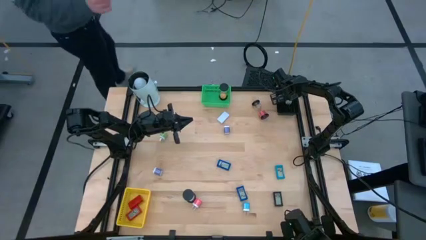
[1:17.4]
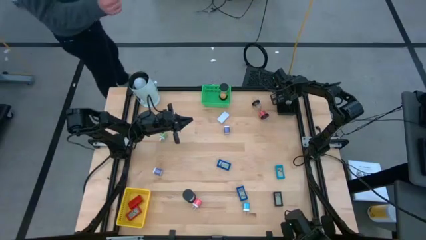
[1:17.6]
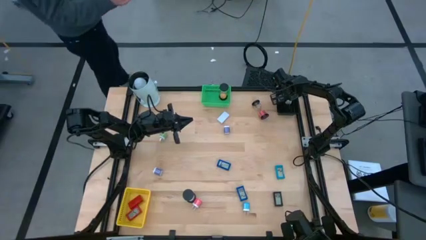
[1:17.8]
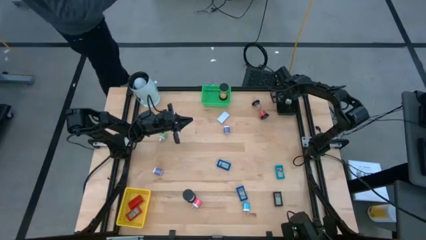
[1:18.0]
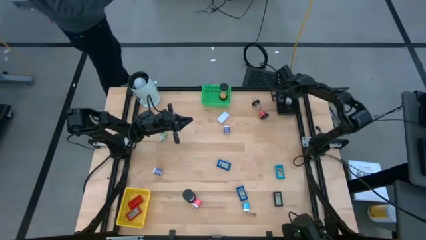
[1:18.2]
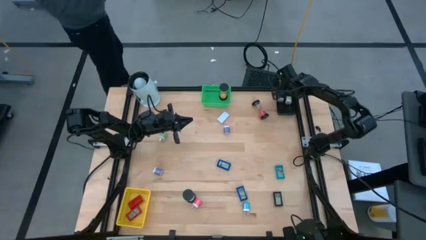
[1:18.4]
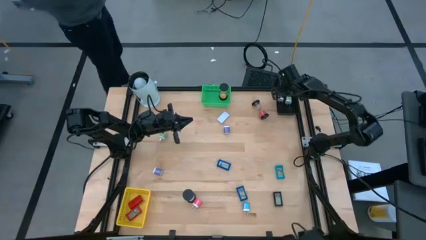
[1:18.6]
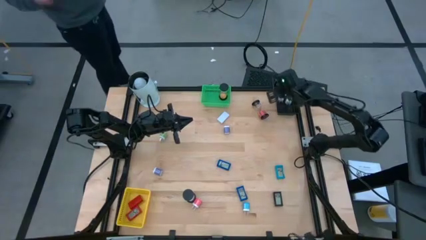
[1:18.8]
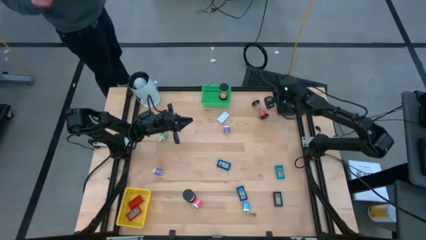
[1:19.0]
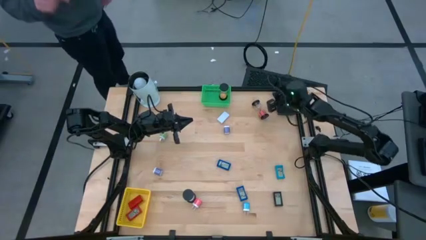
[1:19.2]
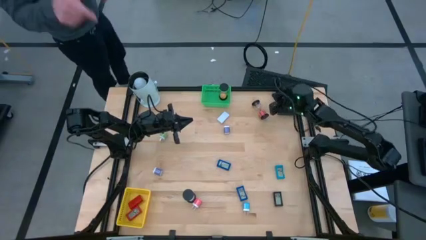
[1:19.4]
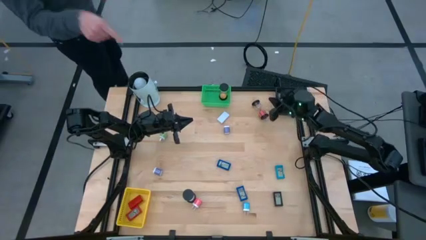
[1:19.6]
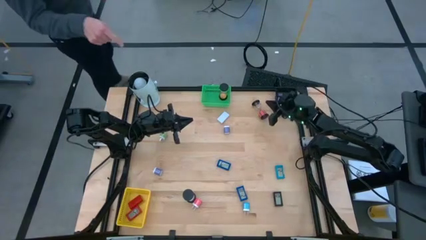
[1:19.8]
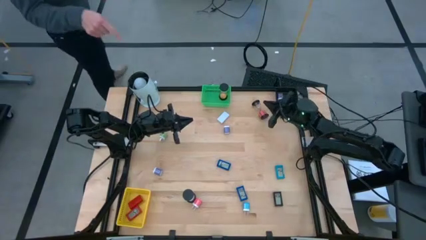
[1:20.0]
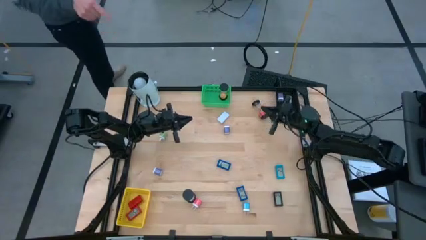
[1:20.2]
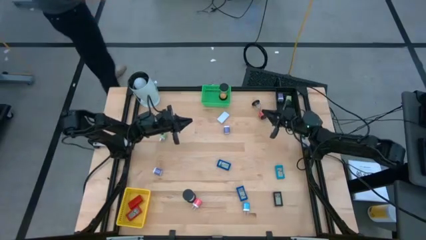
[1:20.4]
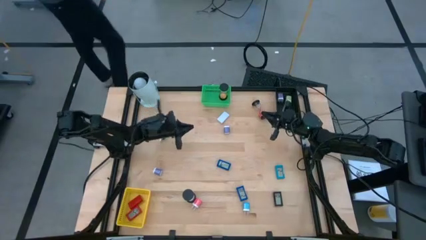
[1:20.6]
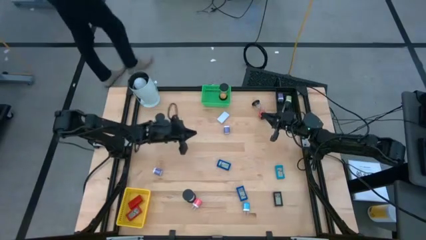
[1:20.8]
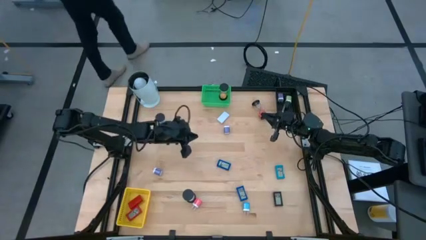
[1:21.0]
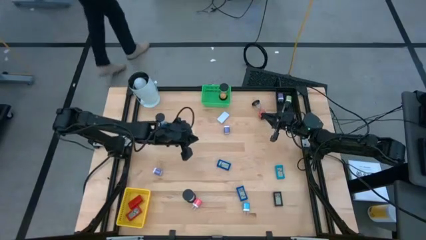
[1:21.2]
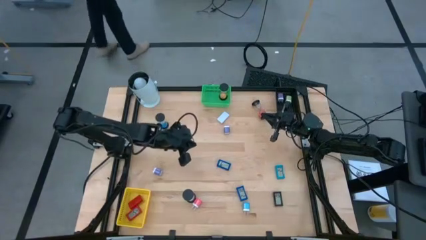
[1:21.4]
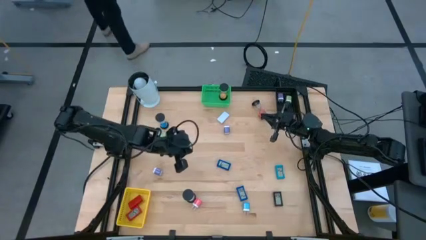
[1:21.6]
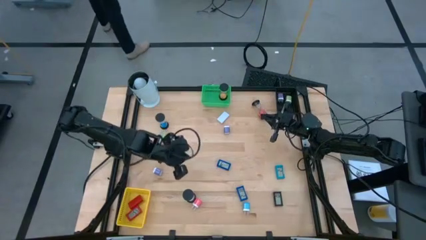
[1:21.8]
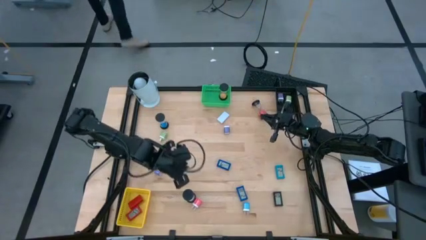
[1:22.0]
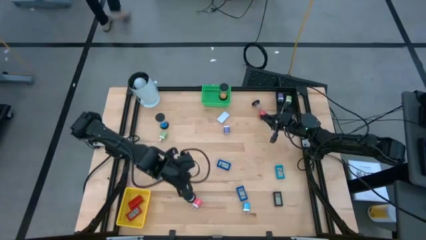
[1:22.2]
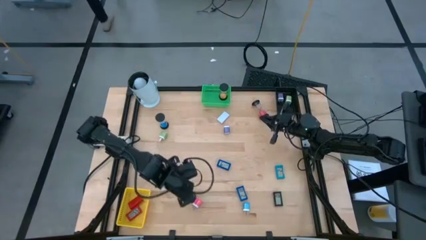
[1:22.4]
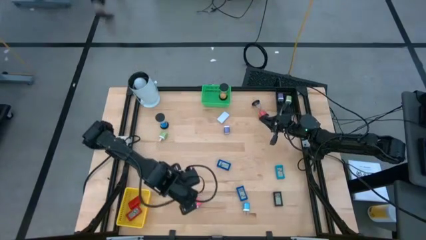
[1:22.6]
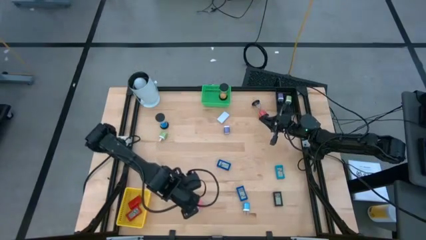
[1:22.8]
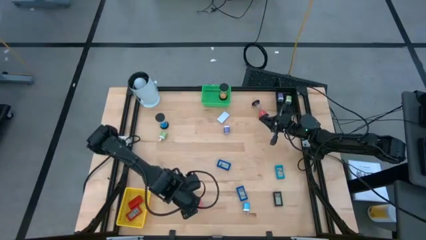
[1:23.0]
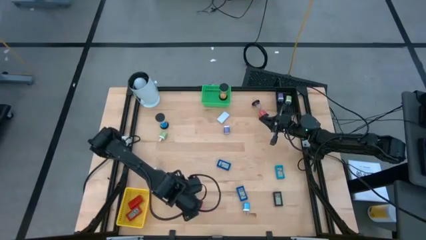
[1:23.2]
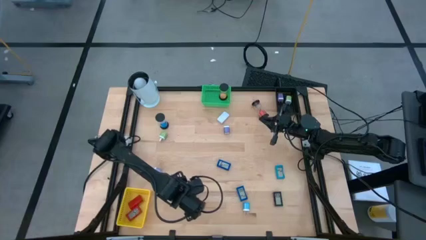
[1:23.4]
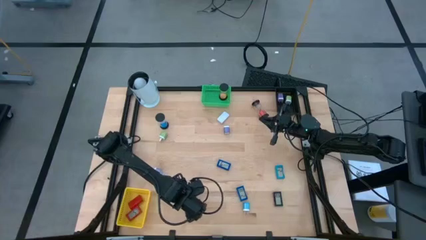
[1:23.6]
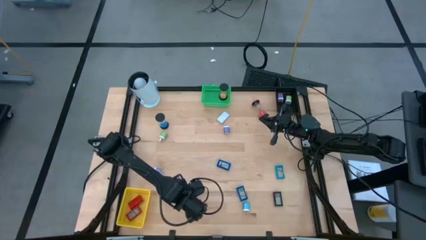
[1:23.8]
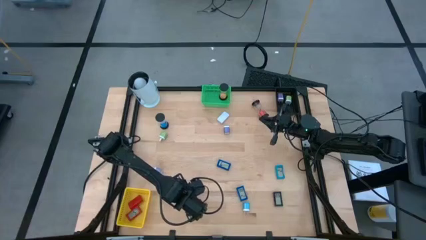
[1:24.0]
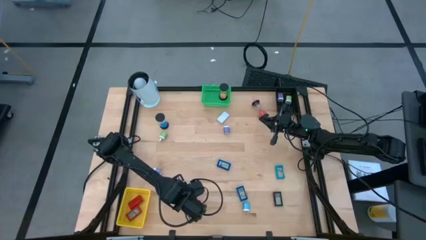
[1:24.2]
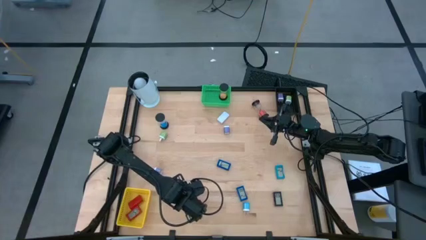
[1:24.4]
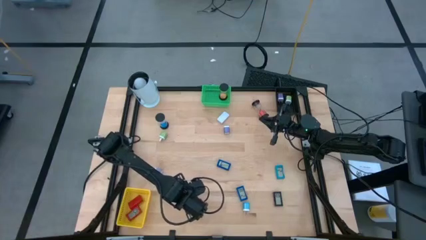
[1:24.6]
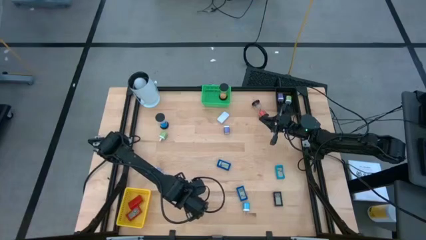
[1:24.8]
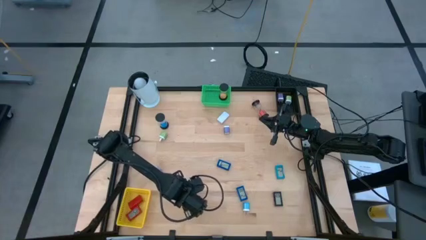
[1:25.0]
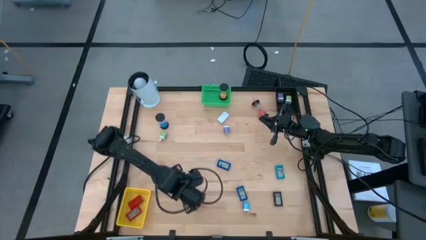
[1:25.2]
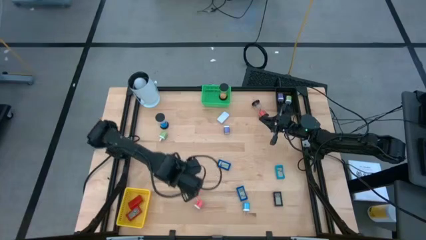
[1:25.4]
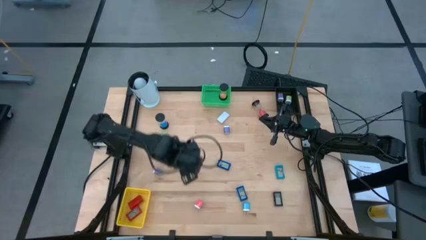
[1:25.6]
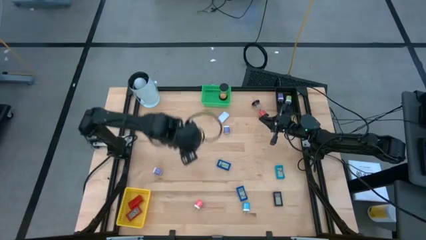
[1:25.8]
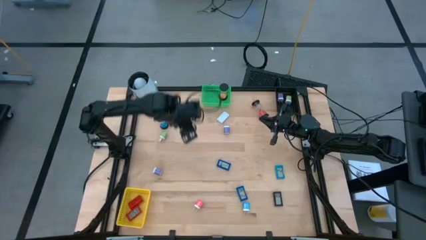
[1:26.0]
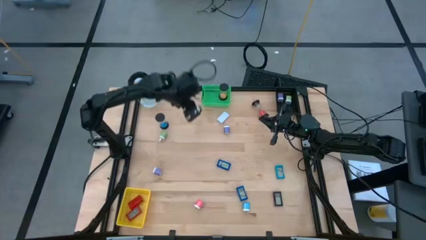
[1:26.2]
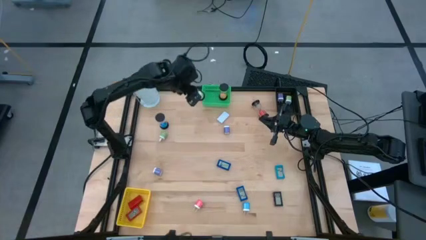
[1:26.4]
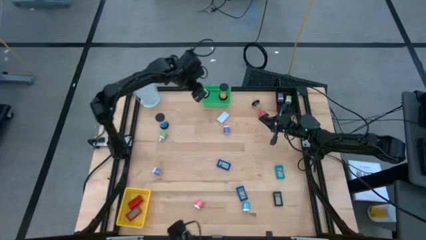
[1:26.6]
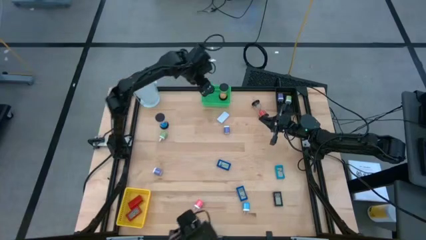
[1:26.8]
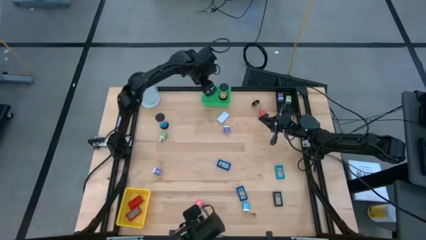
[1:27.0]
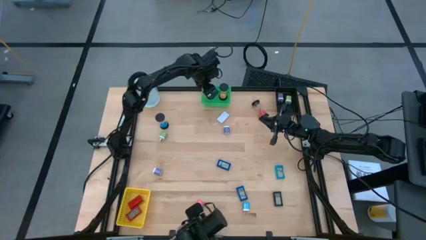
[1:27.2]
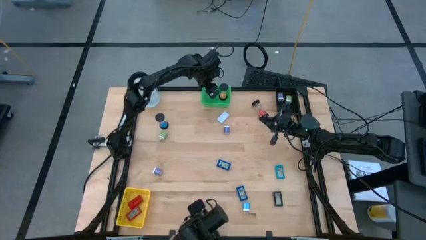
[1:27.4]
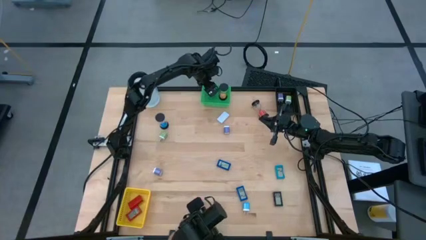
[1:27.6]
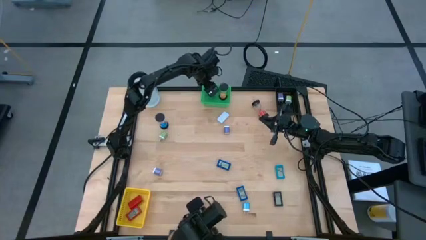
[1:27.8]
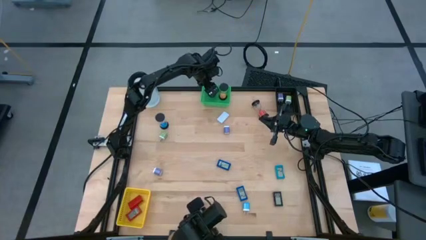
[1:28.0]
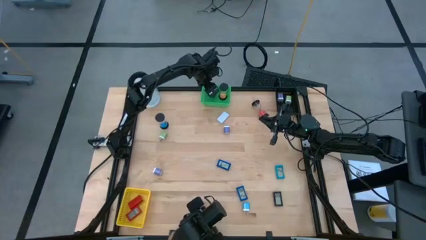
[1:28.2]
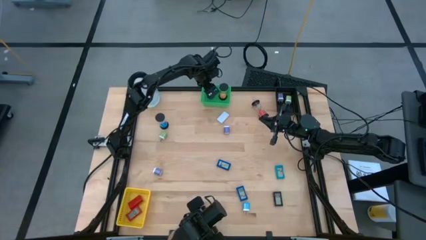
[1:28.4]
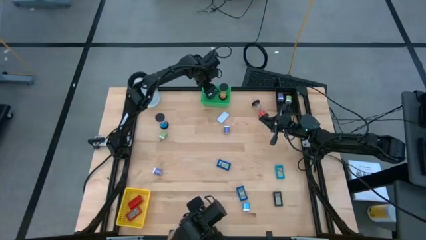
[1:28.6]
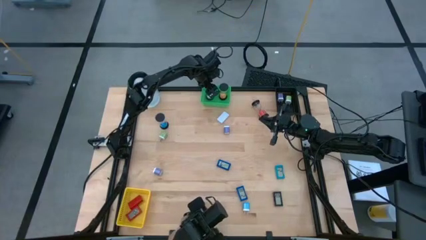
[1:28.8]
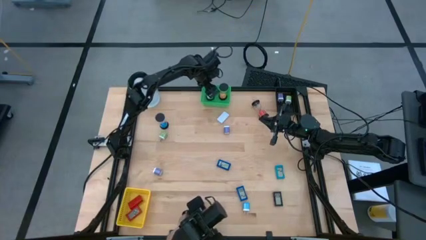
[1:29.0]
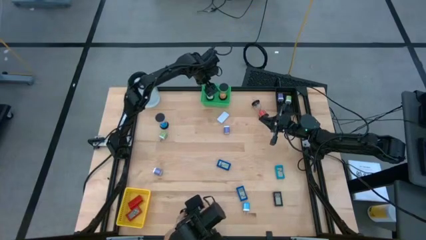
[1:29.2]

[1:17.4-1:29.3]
Task: Pick & Place Office items
Put the white hourglass into the green basket

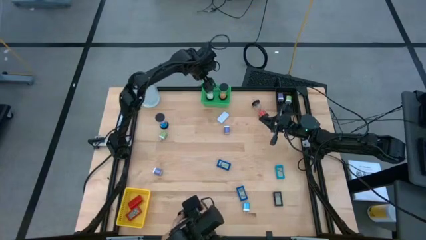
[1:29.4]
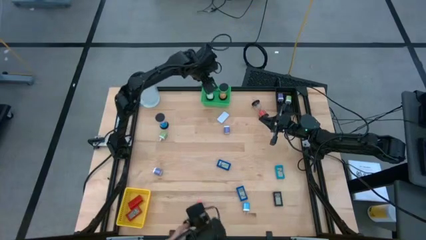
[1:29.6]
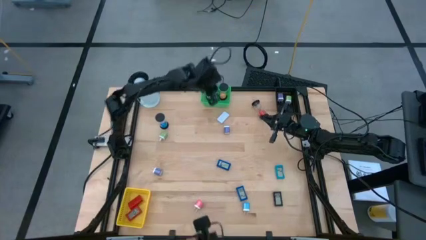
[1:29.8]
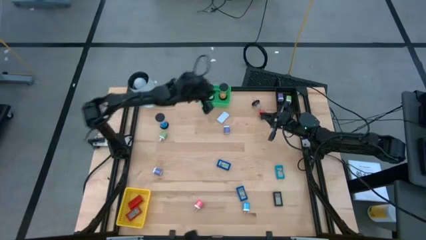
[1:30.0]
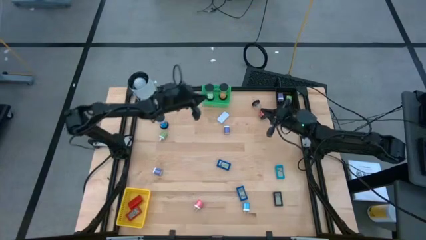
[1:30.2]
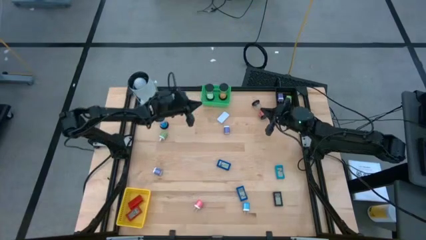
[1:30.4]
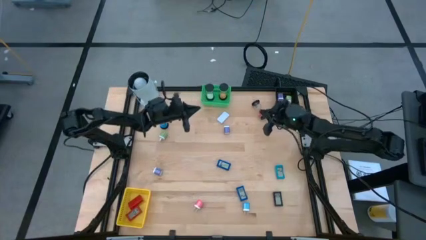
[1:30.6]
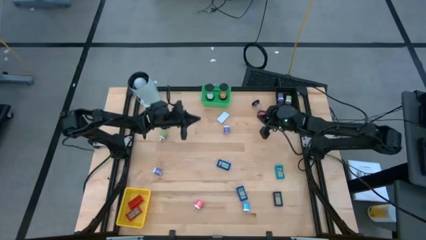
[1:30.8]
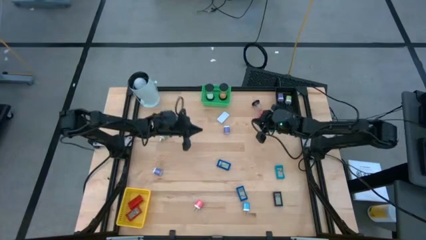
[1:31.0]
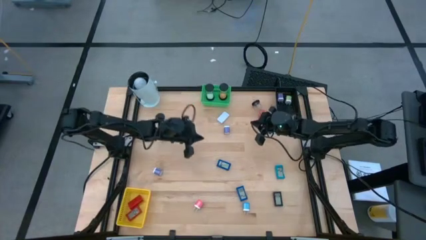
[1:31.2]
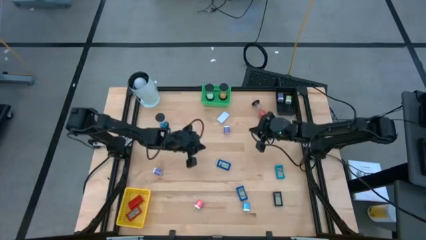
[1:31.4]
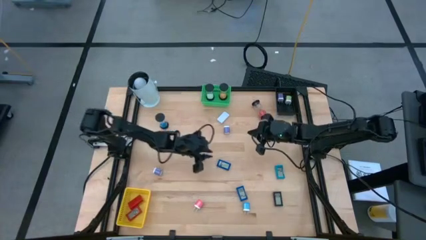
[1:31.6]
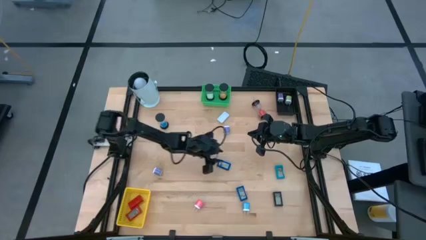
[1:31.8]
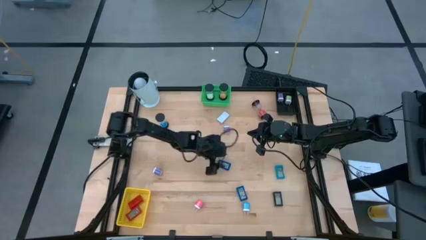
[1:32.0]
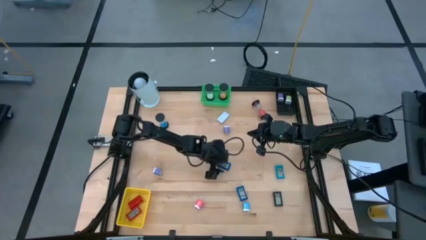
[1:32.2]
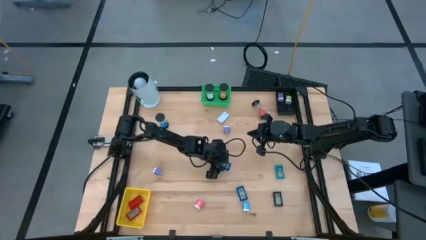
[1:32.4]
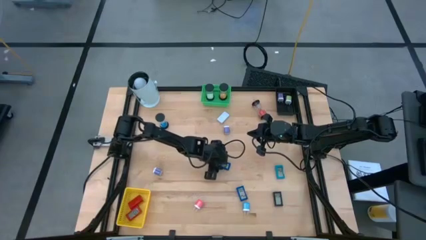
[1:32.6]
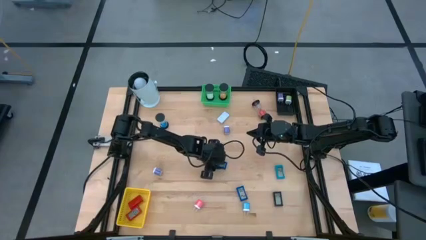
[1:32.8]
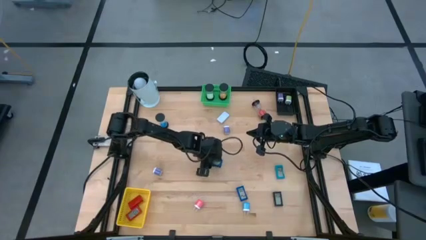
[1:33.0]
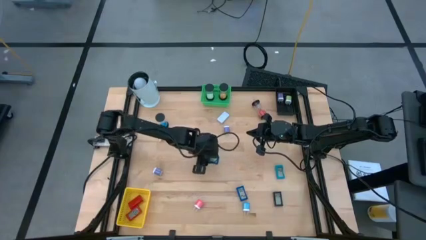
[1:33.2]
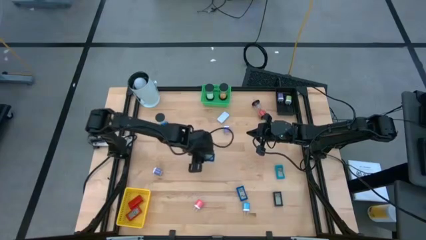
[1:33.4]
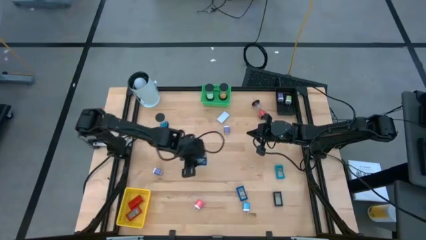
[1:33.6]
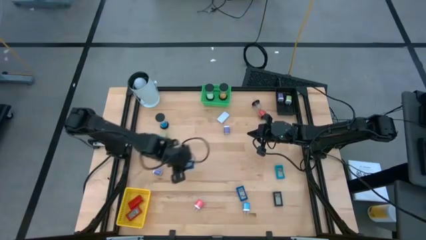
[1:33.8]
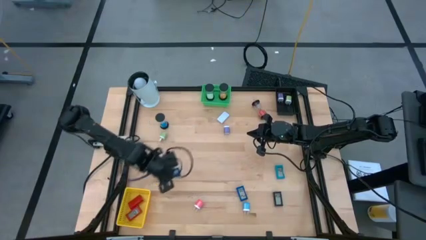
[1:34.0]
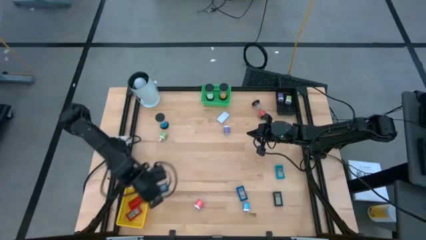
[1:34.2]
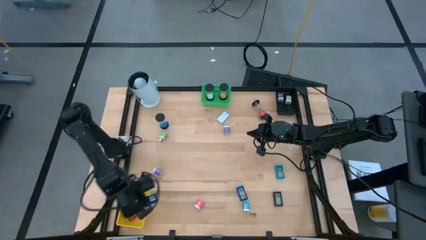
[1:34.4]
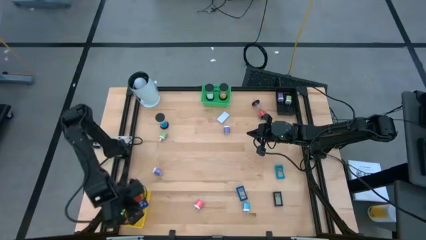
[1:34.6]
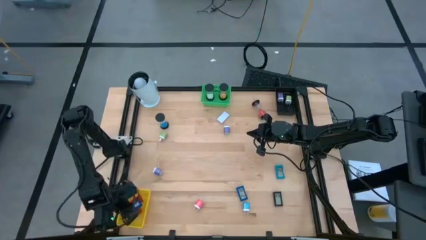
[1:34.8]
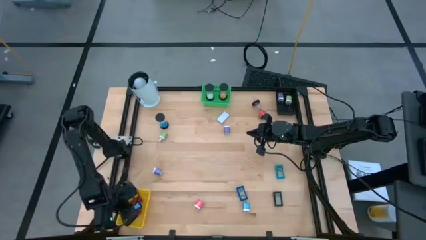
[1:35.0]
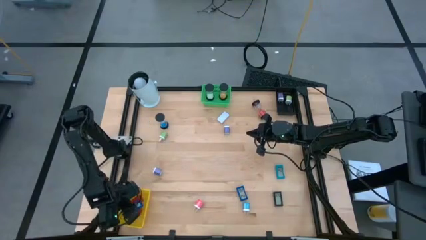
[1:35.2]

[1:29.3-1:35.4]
Put the top blue timer into the yellow basket
